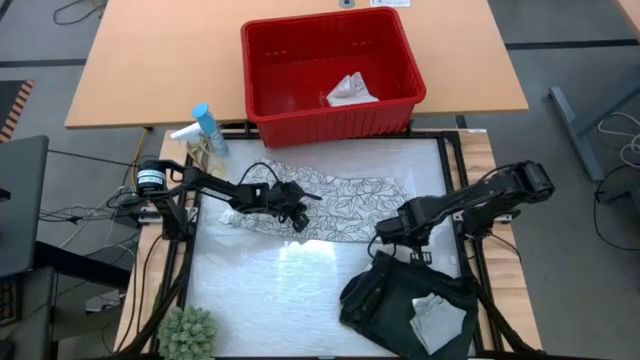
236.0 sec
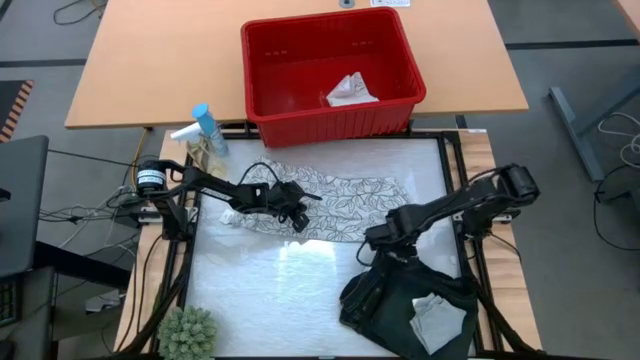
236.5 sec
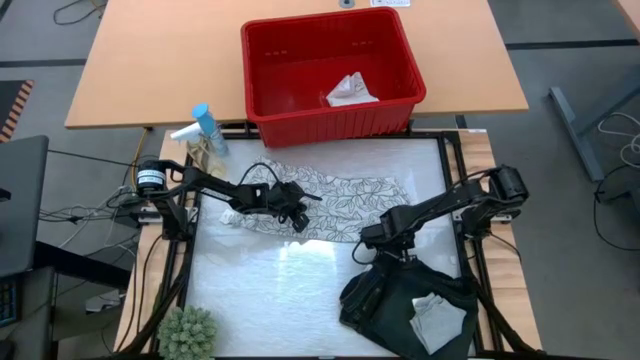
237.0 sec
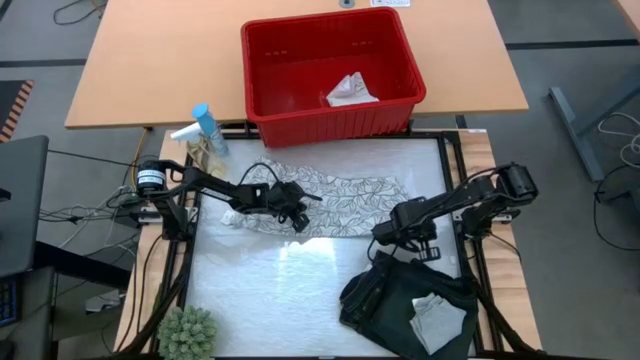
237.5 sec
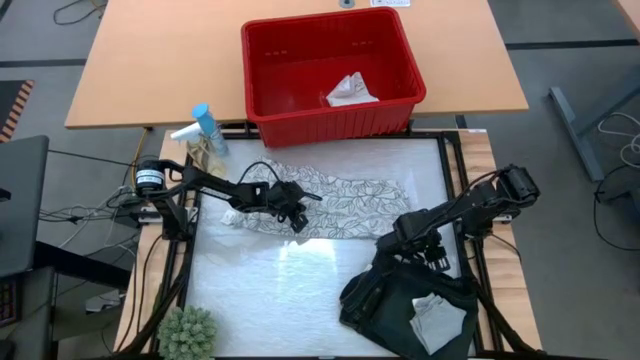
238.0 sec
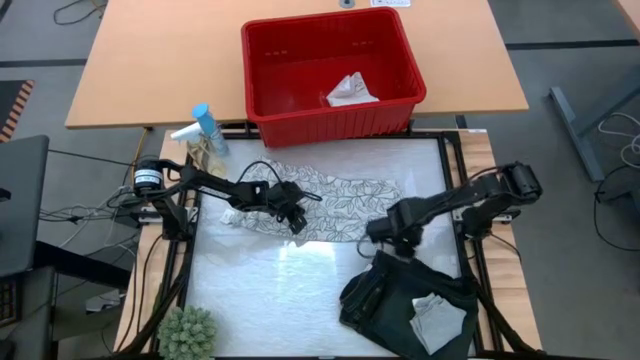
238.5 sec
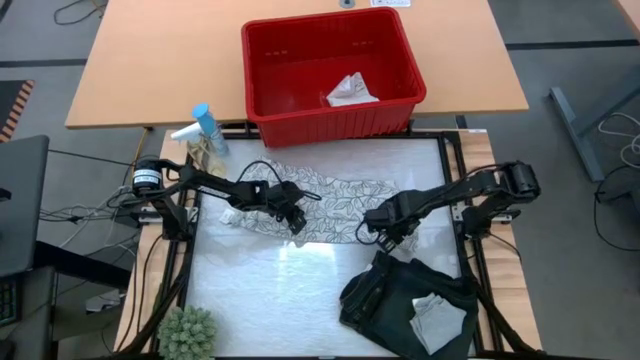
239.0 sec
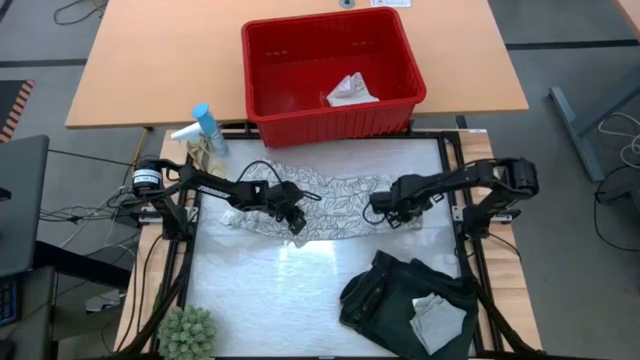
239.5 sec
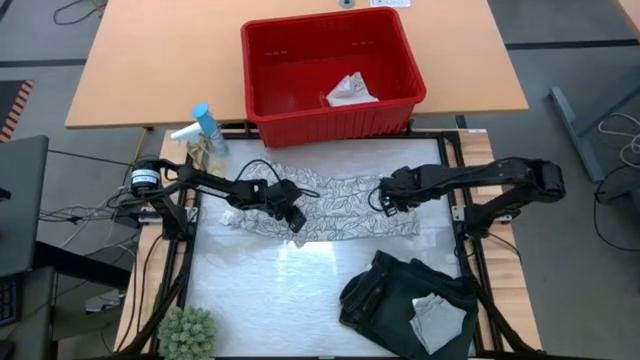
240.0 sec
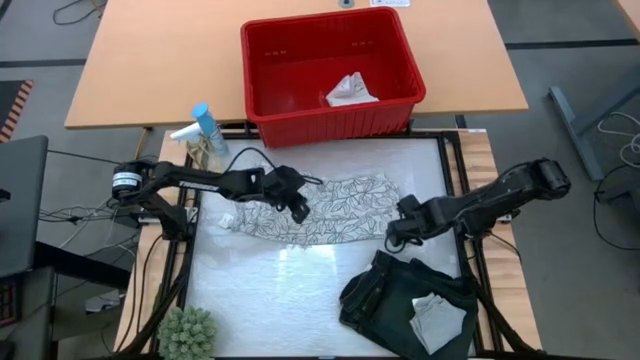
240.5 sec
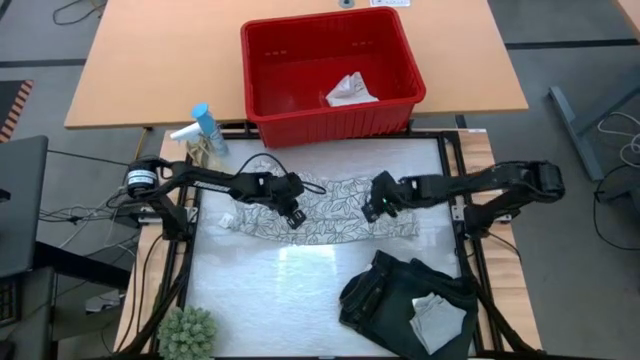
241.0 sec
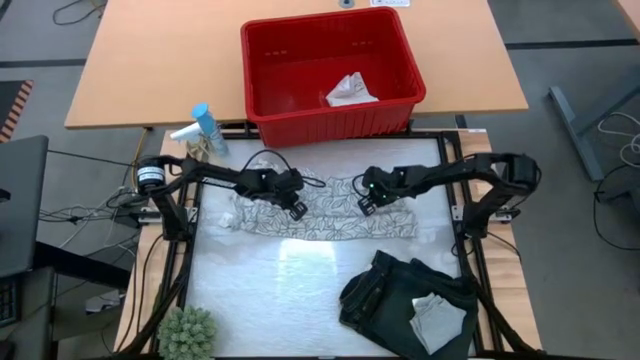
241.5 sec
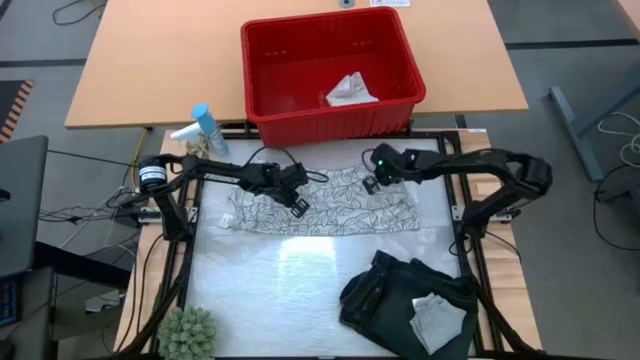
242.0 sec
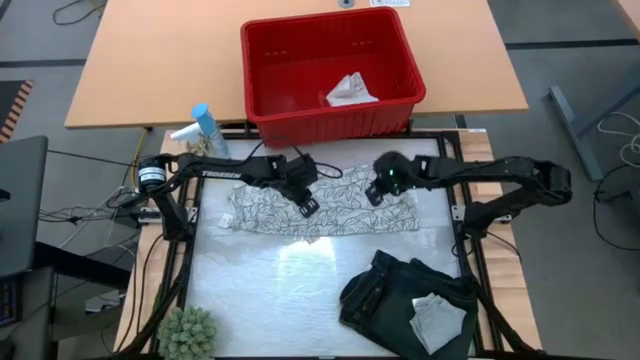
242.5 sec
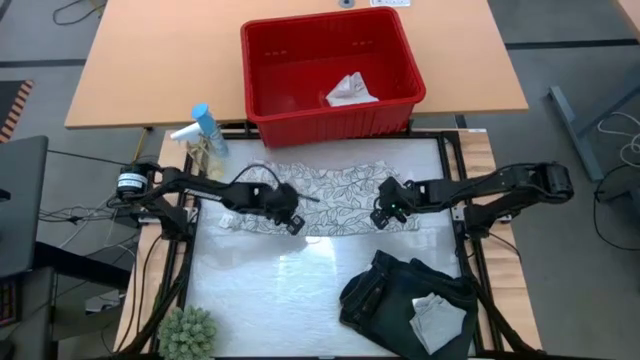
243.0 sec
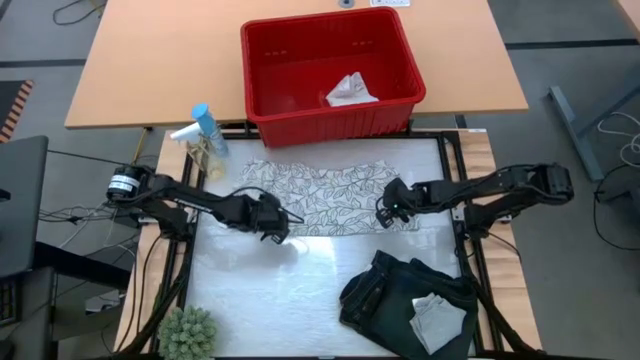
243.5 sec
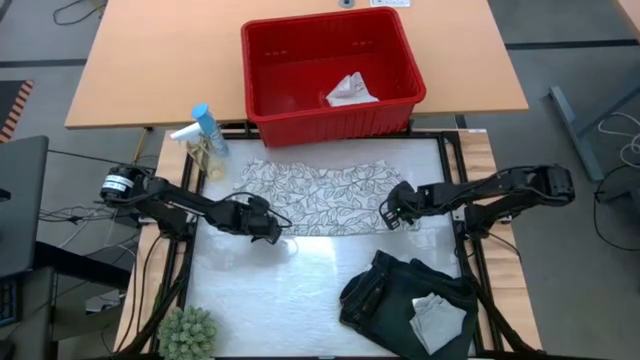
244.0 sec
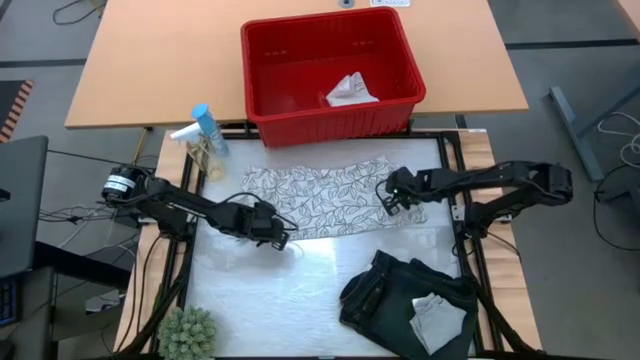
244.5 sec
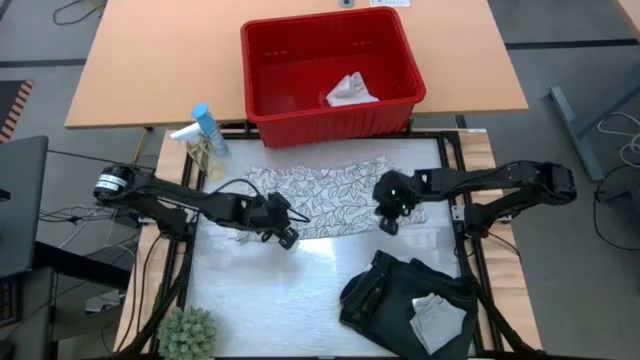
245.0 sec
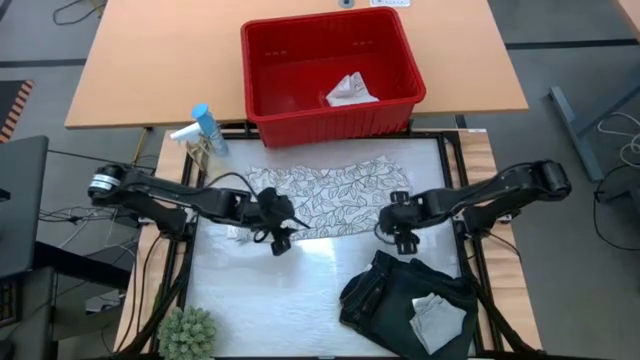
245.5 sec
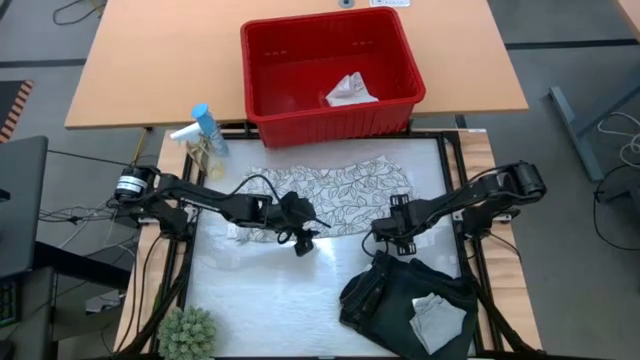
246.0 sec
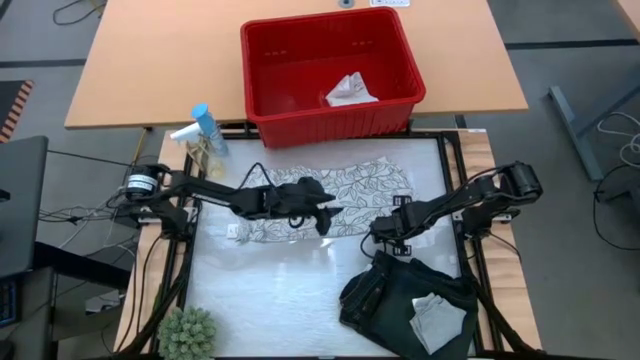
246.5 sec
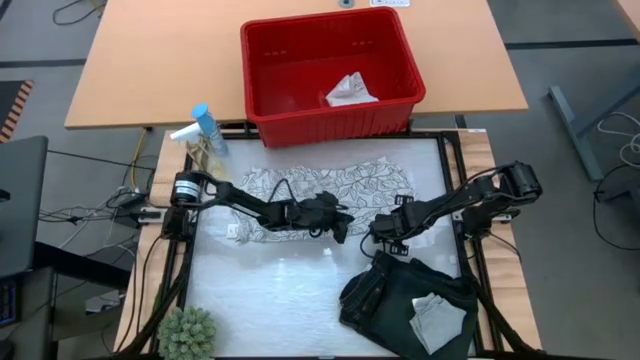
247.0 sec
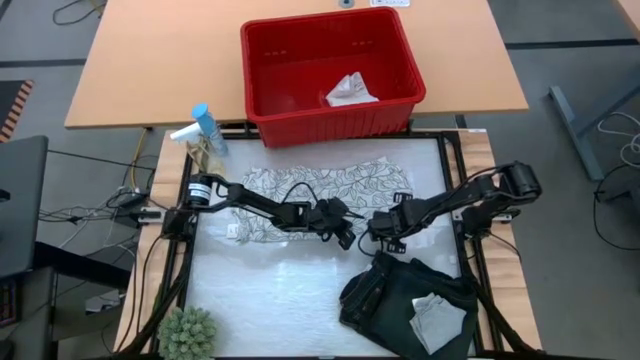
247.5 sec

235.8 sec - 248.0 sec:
Task: Fold Laundry from Bin
Fold the white from the red laundry bin

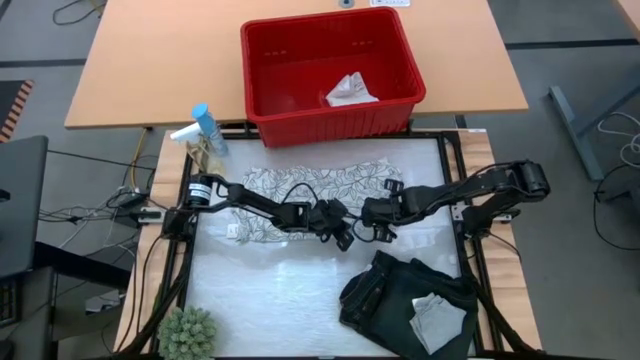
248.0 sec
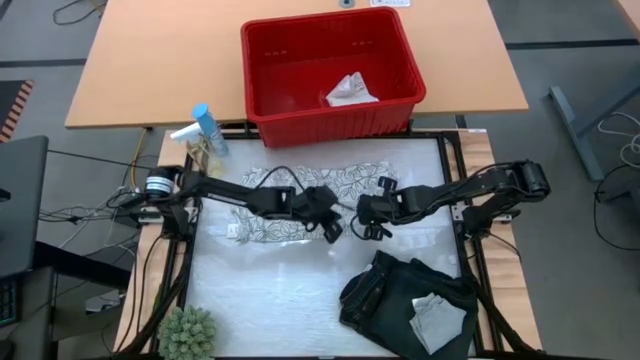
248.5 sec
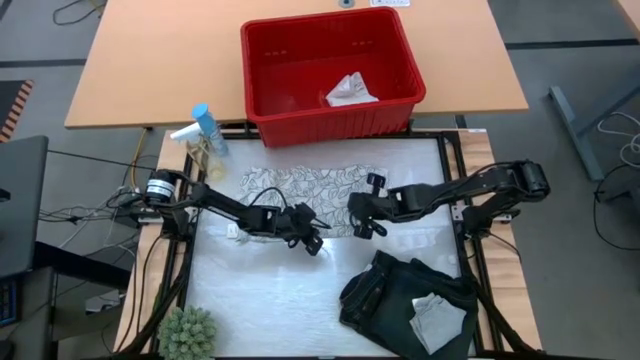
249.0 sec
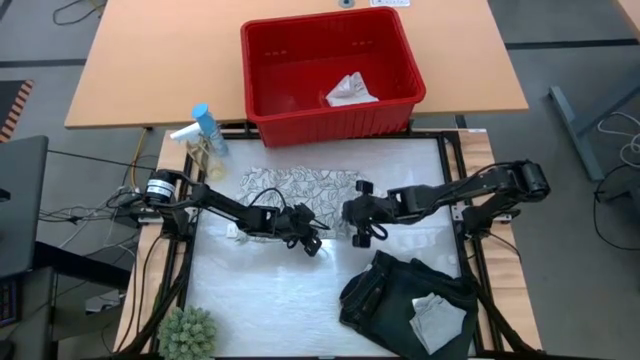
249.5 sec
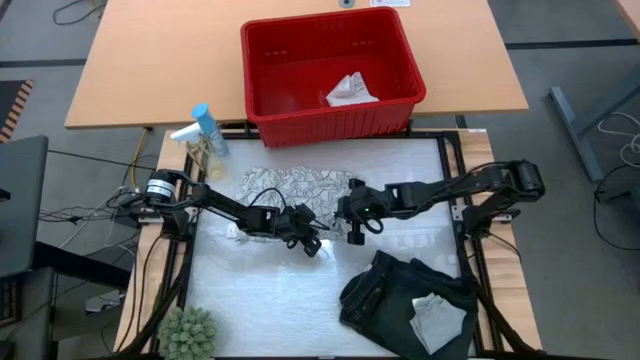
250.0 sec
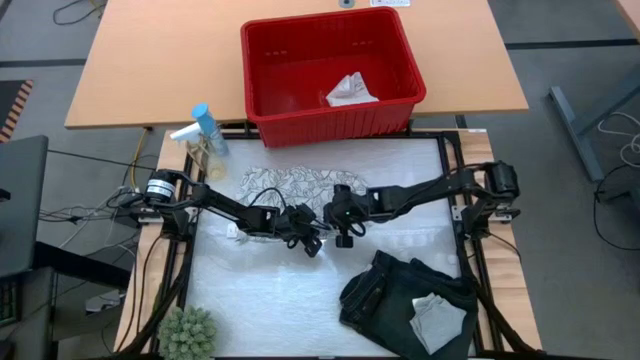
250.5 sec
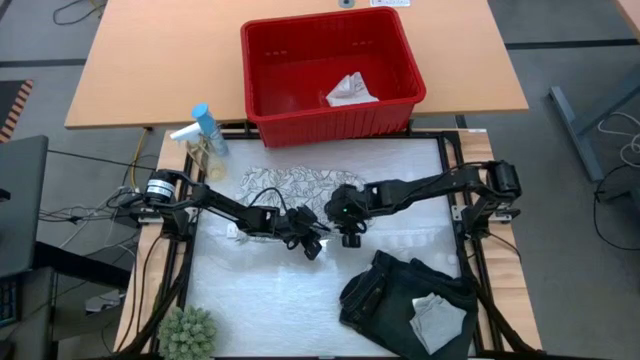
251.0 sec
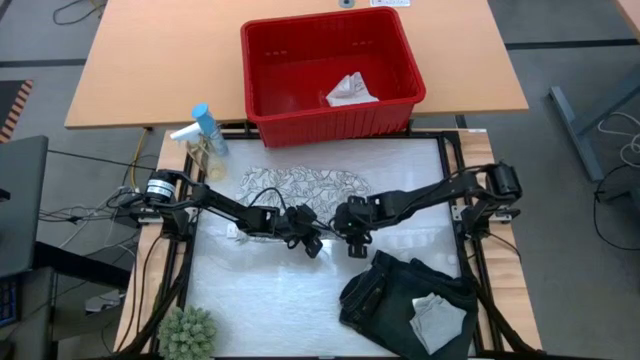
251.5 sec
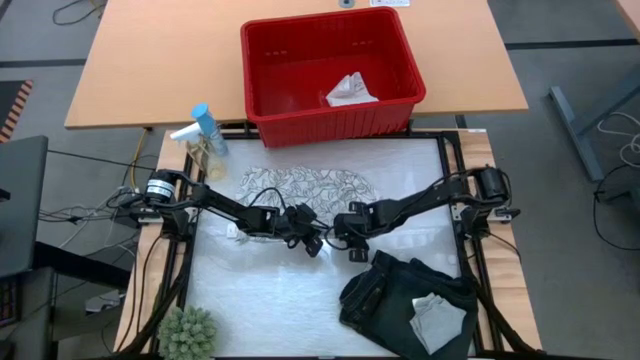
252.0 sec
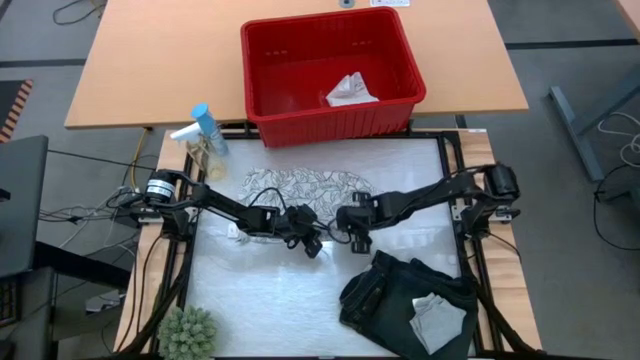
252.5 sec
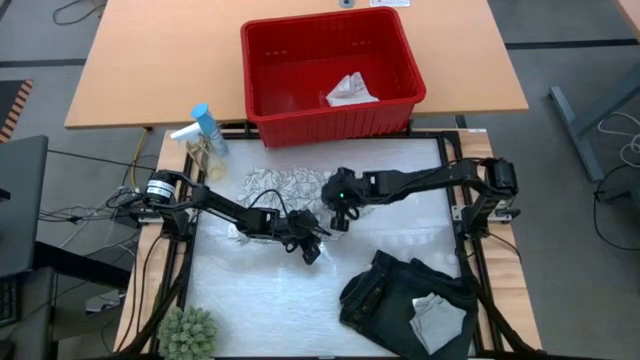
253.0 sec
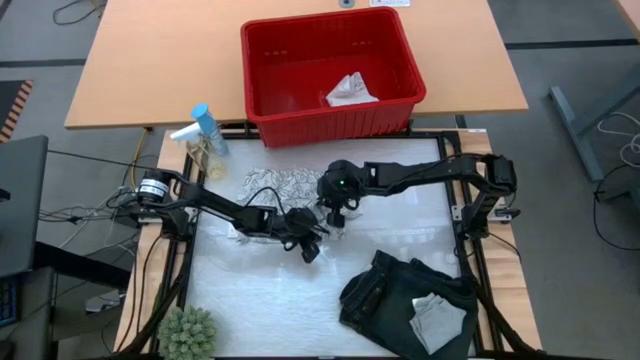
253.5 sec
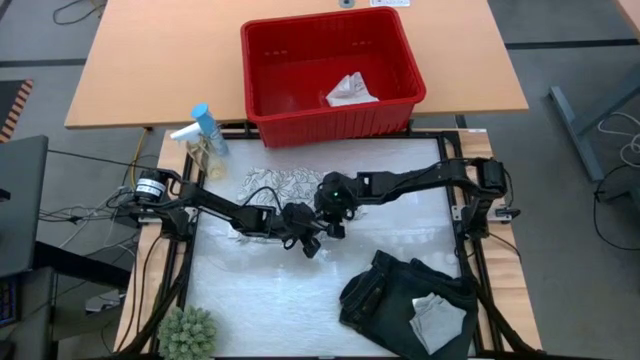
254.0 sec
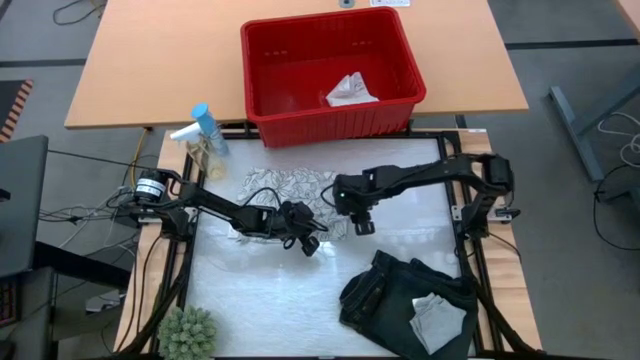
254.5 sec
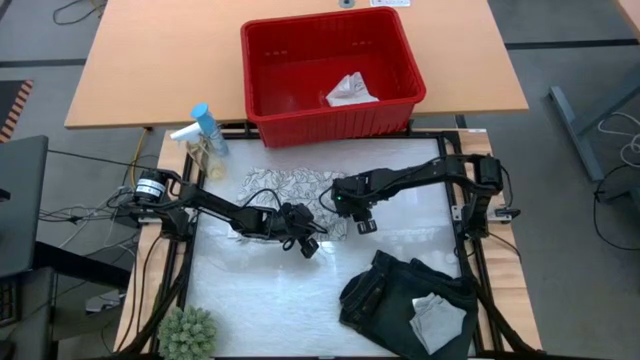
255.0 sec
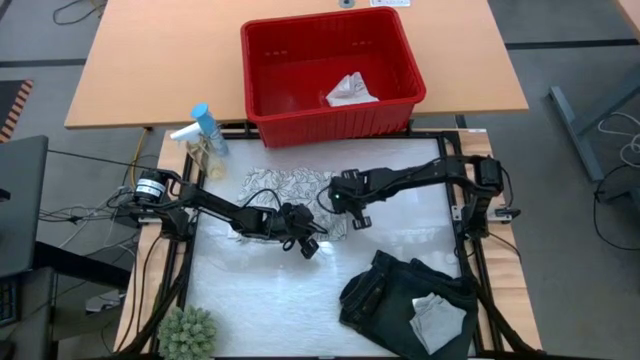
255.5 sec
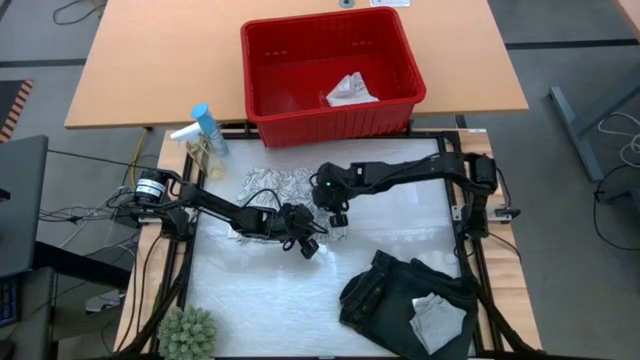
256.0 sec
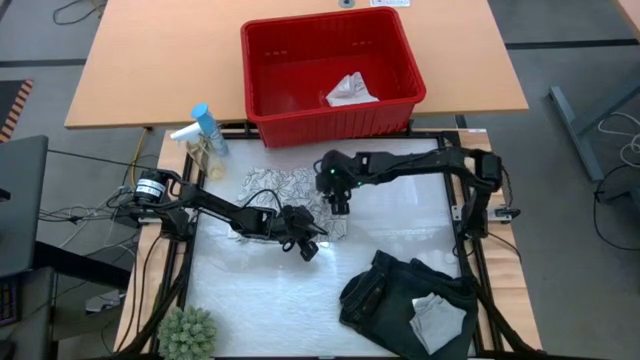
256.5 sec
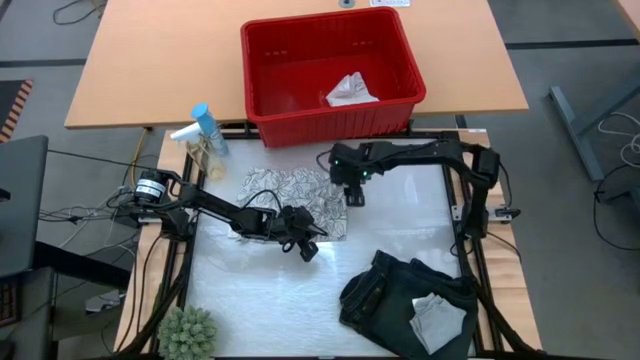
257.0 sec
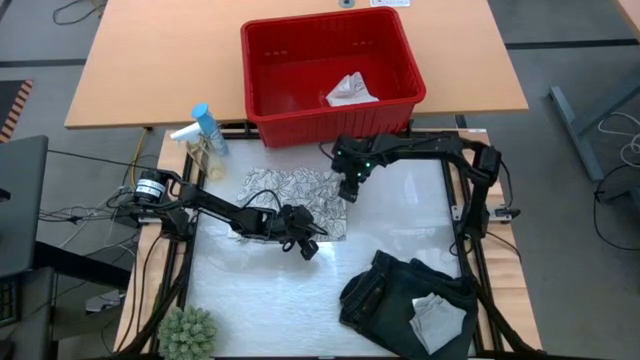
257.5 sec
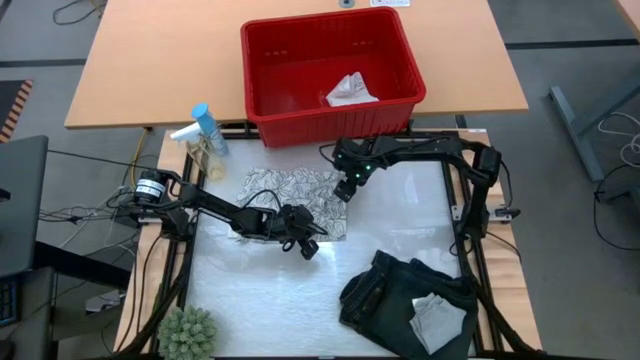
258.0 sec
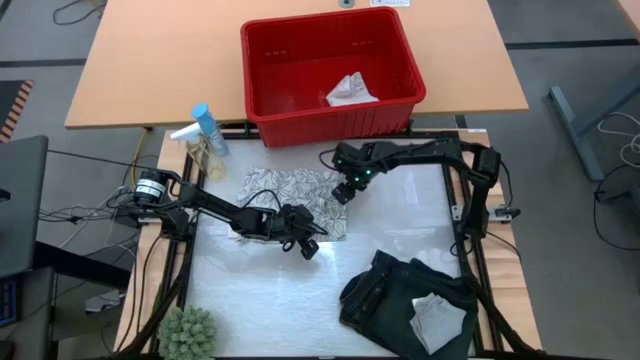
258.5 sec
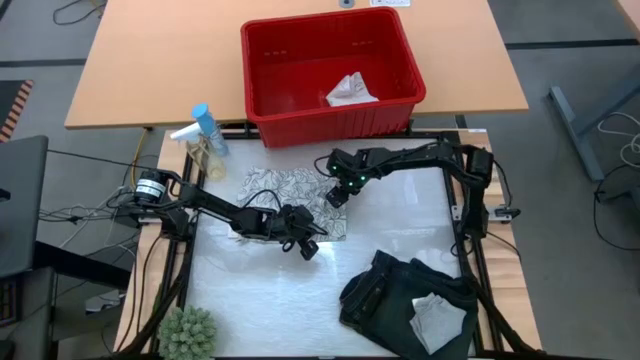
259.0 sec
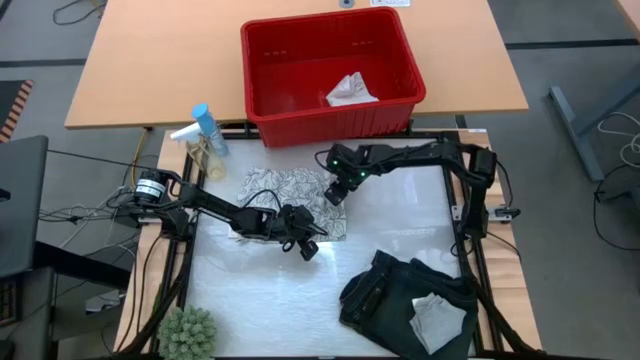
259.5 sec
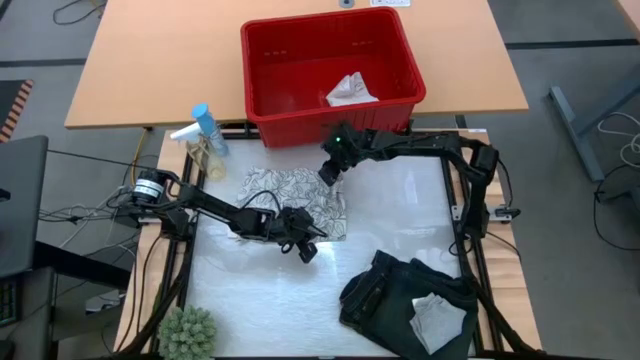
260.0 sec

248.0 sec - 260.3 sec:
Fold the white from the red laundry bin
